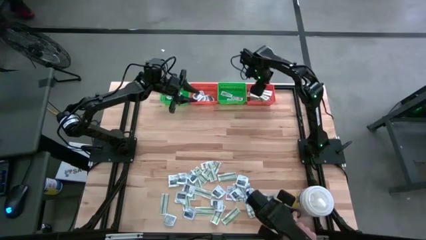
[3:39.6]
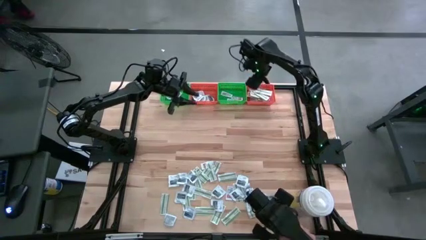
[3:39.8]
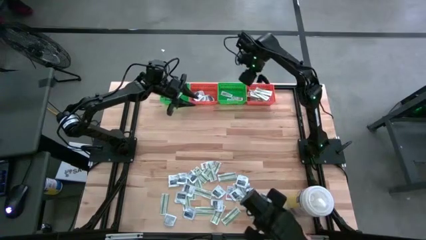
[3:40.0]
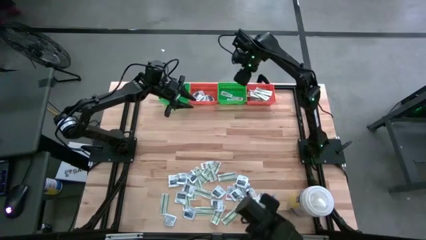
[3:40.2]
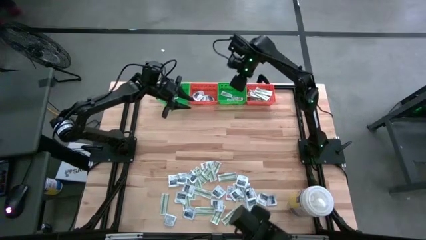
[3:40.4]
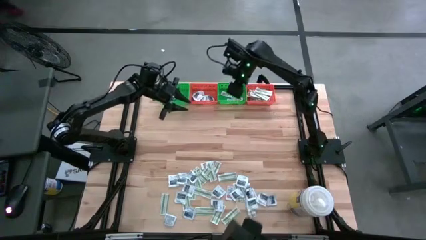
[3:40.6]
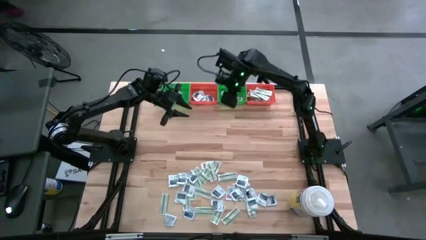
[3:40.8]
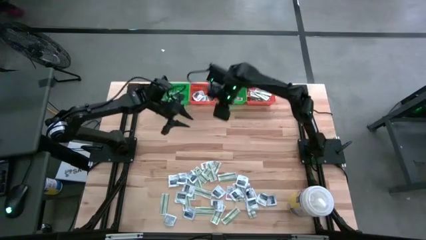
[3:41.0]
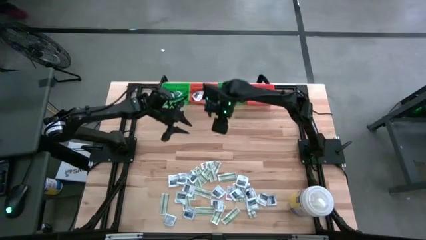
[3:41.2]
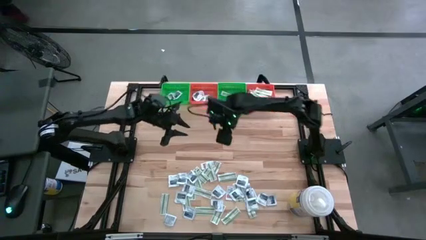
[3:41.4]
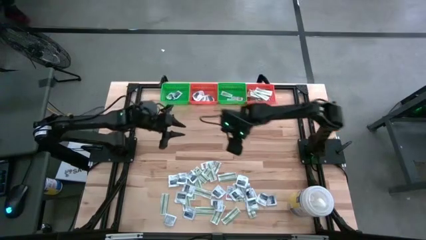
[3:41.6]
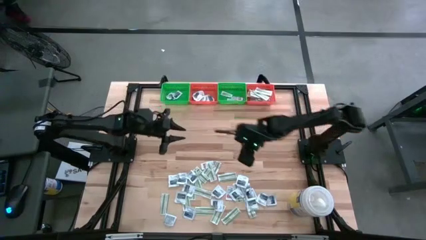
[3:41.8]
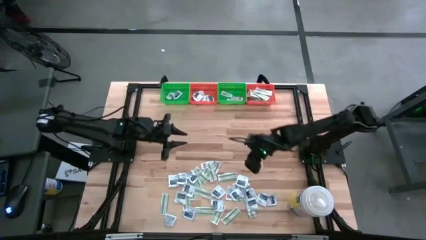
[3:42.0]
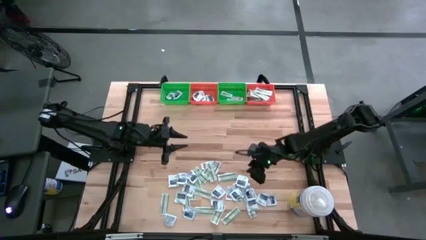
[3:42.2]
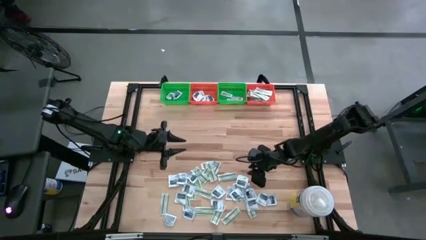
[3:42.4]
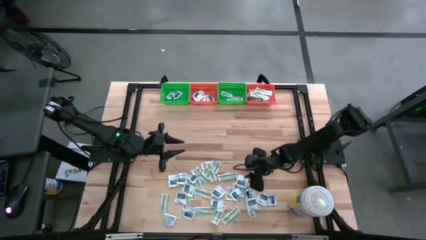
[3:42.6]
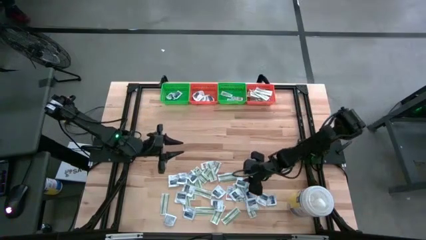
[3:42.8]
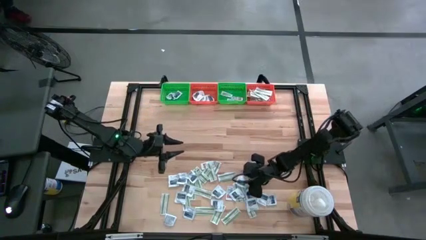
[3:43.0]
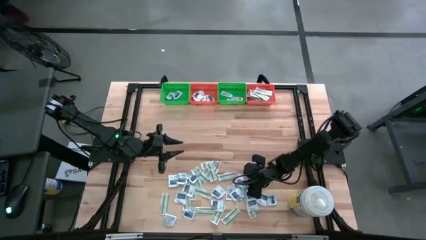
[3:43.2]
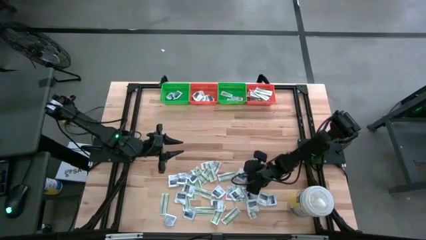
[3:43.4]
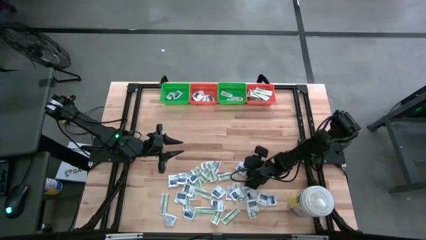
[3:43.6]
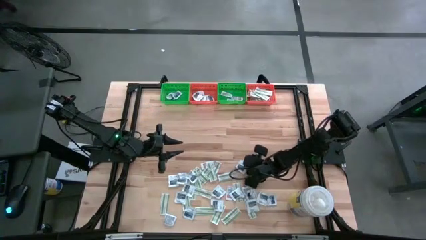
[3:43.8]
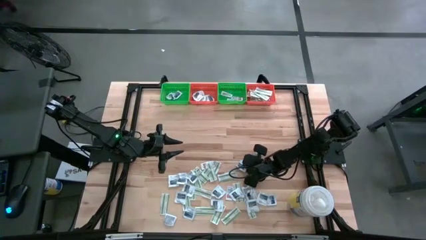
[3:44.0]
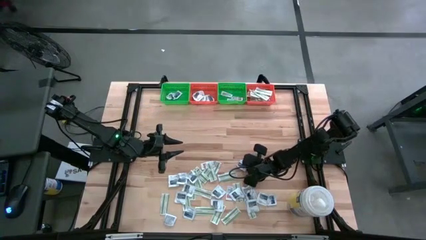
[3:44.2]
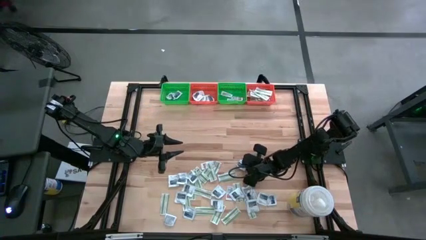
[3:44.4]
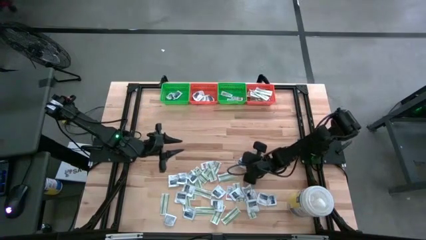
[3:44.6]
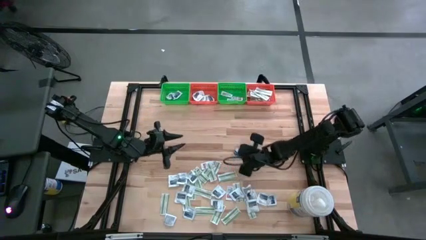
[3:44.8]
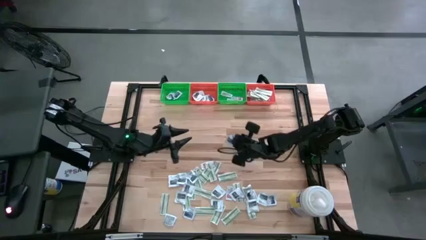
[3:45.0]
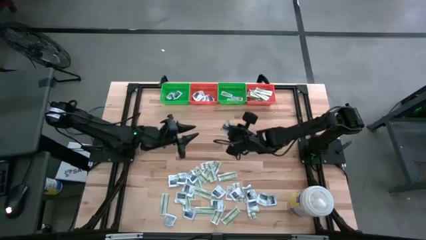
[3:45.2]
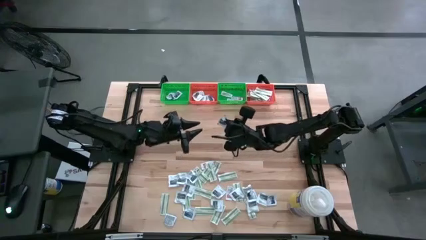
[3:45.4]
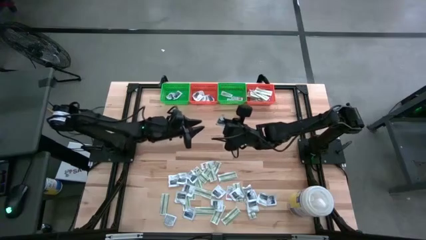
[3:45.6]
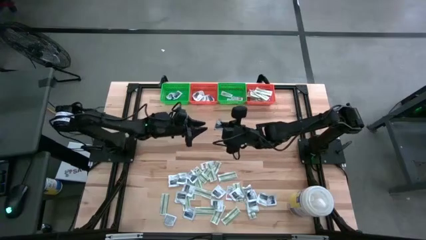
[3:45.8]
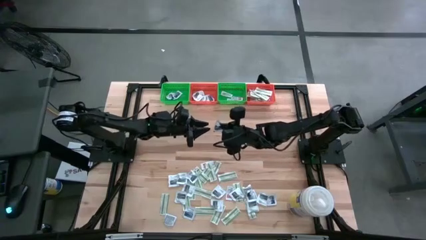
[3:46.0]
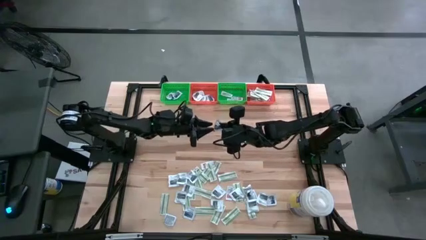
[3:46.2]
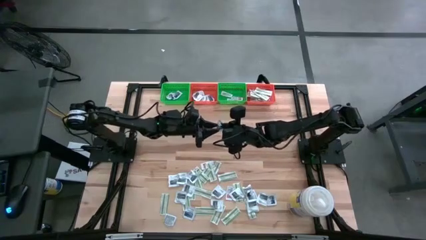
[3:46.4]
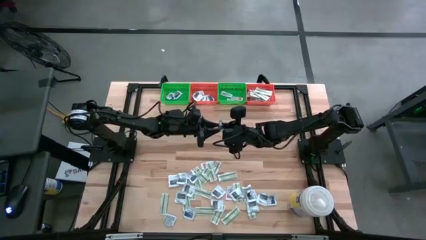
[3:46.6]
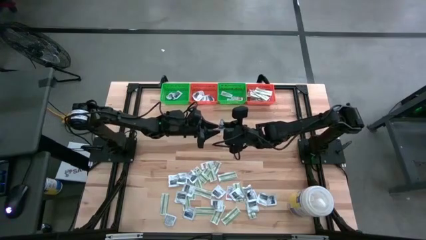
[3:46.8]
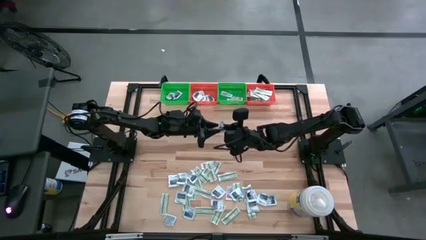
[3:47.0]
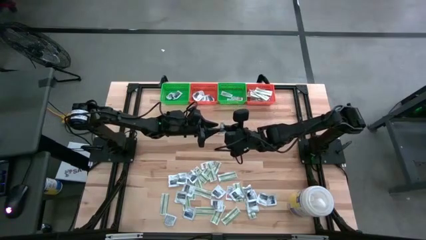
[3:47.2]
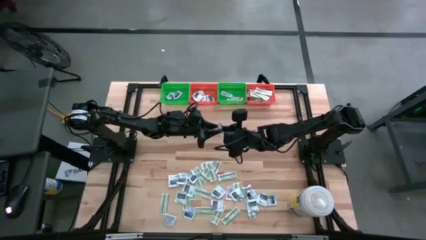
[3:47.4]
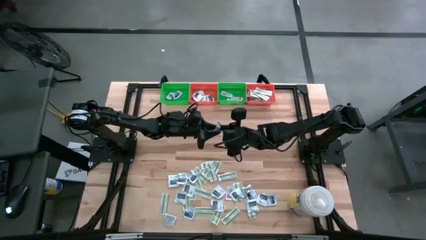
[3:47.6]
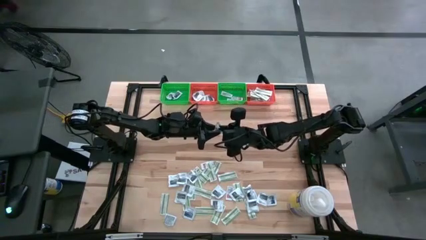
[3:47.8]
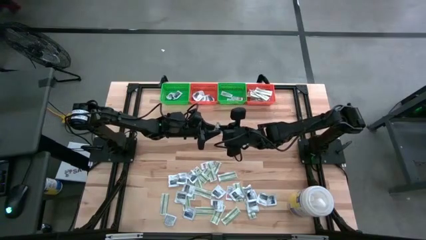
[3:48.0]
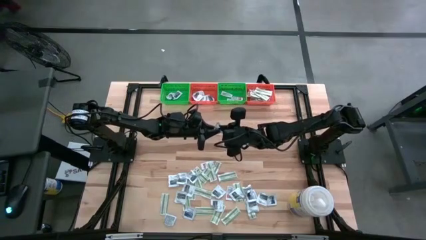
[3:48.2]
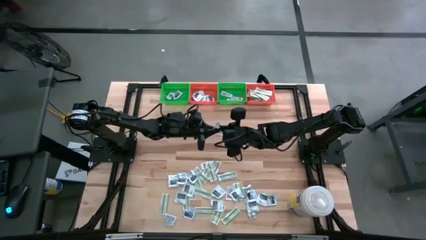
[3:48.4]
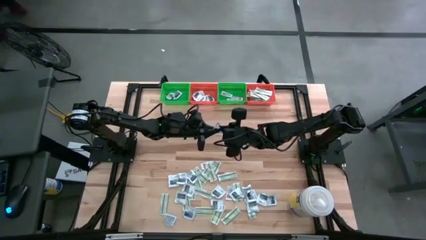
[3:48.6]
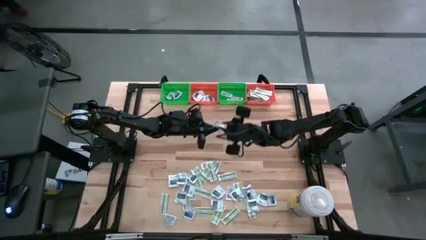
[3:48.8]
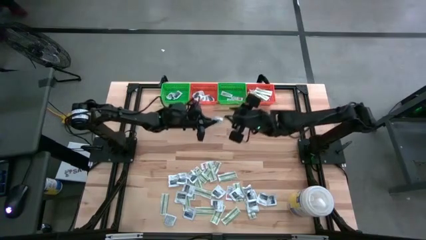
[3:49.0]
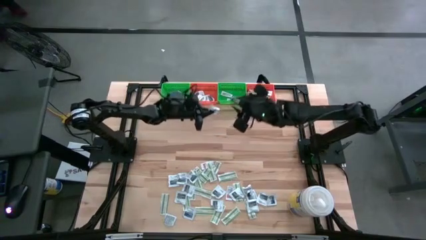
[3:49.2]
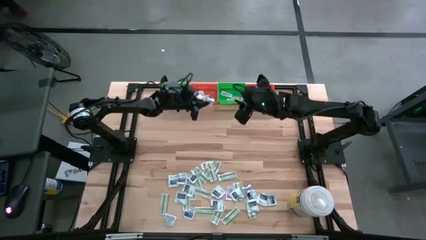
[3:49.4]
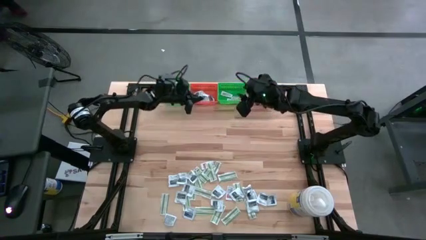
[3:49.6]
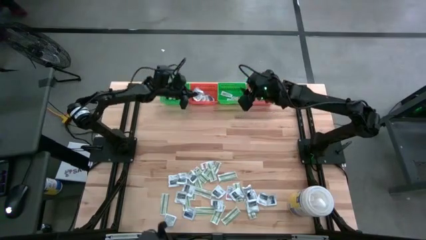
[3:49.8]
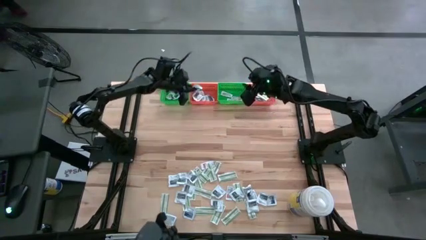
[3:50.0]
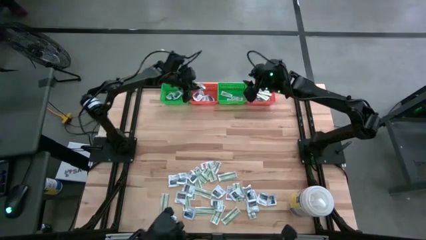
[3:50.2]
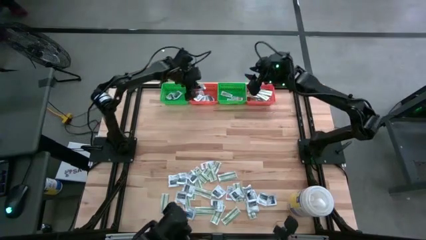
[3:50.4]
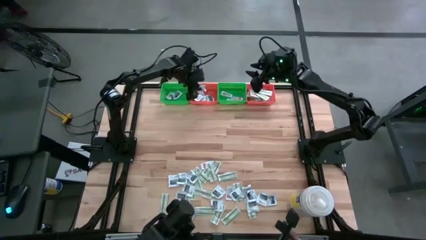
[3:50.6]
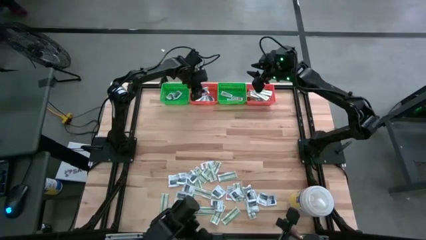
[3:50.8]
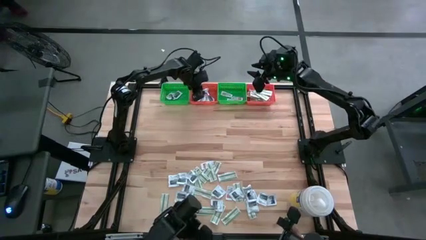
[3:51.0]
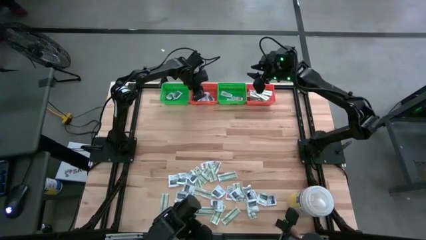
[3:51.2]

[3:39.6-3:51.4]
Task: Pick & Place First Aid Supplies
Put the gray towelette pack in the left orange bin

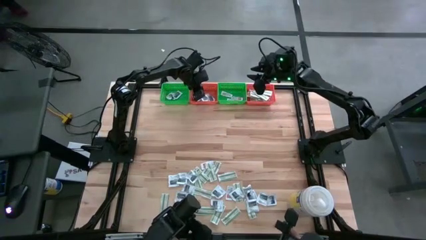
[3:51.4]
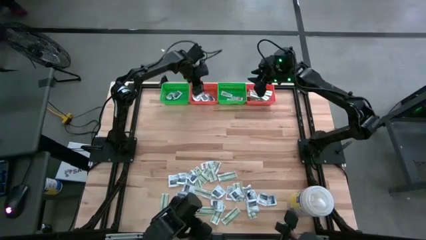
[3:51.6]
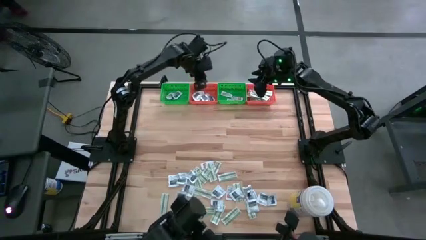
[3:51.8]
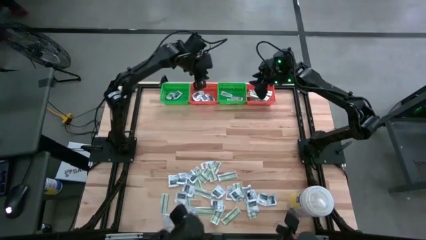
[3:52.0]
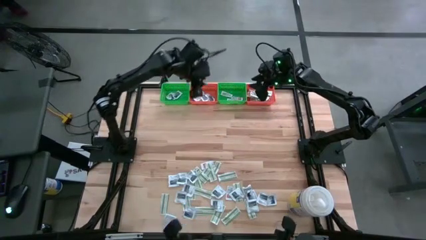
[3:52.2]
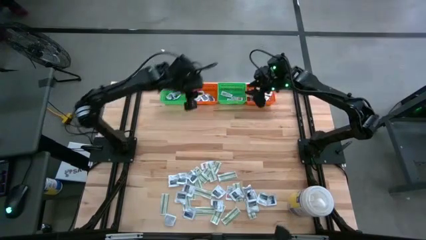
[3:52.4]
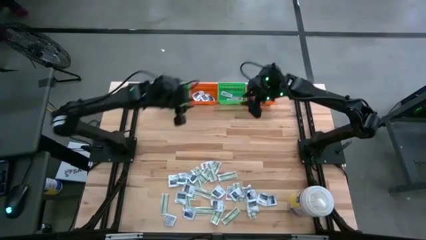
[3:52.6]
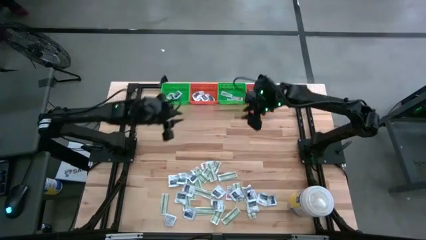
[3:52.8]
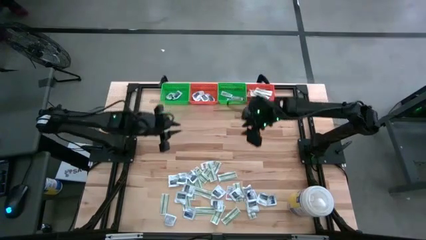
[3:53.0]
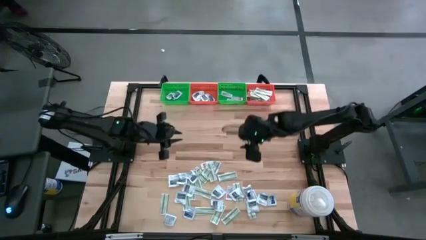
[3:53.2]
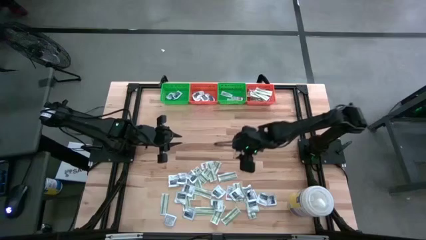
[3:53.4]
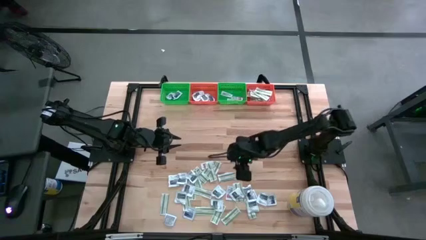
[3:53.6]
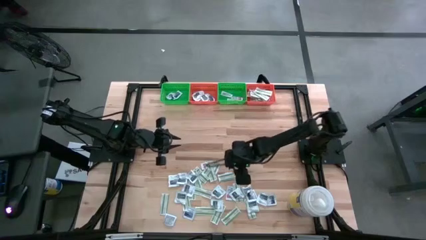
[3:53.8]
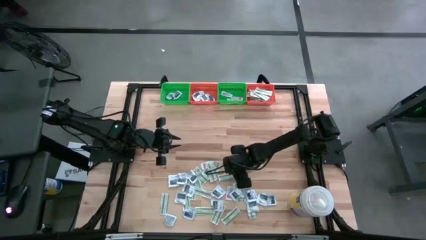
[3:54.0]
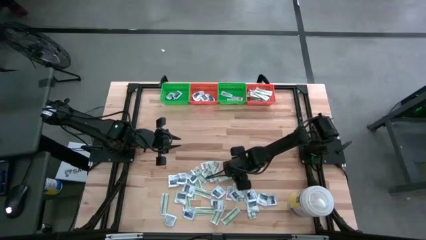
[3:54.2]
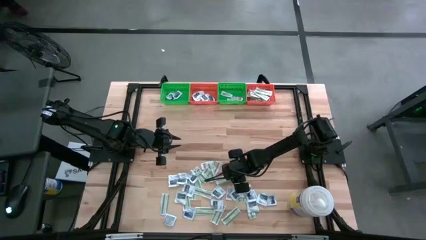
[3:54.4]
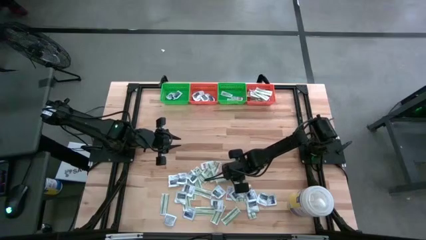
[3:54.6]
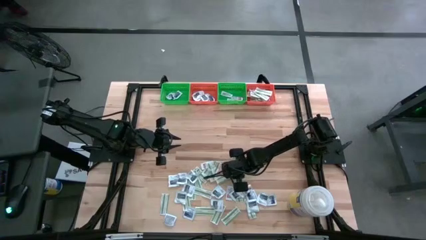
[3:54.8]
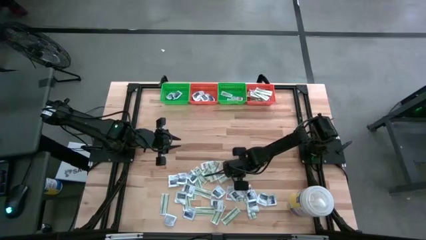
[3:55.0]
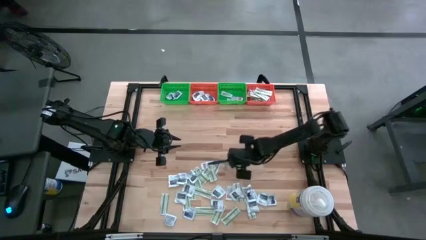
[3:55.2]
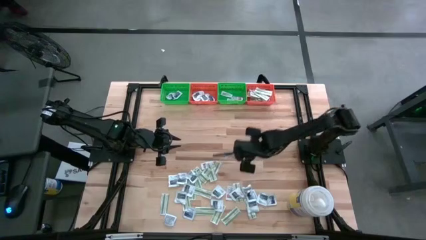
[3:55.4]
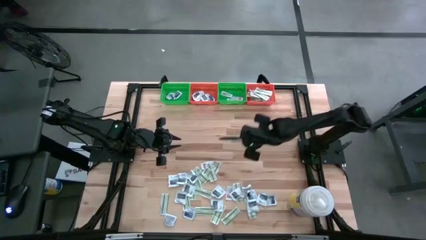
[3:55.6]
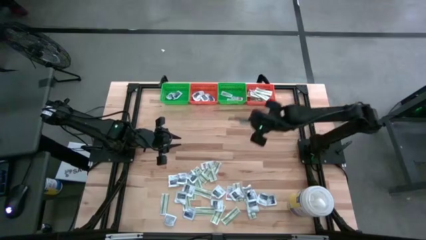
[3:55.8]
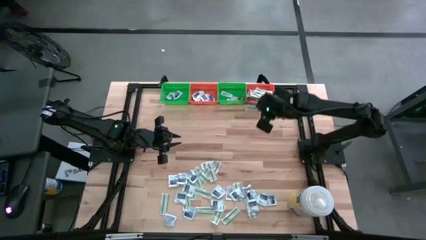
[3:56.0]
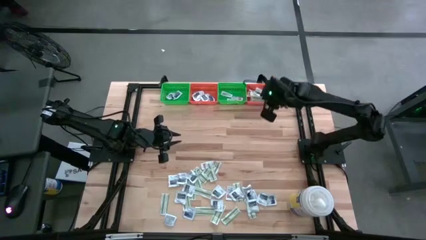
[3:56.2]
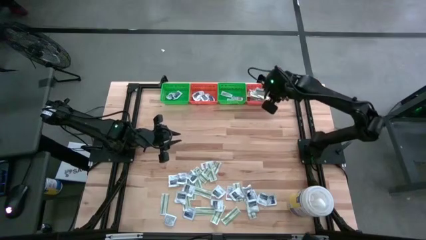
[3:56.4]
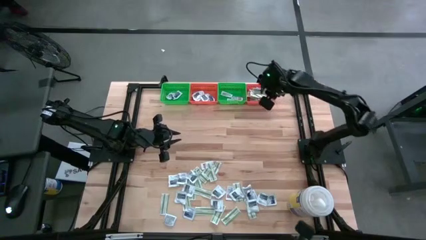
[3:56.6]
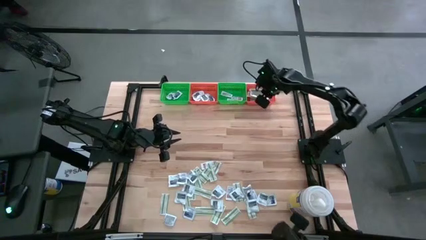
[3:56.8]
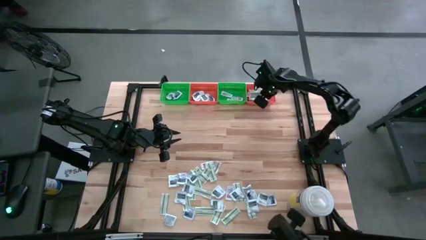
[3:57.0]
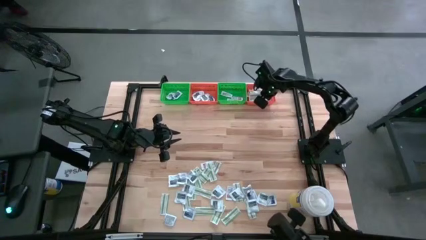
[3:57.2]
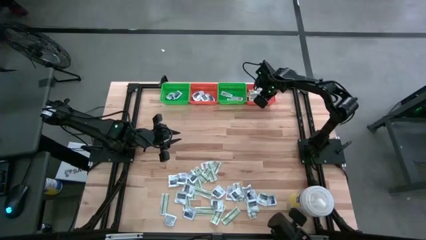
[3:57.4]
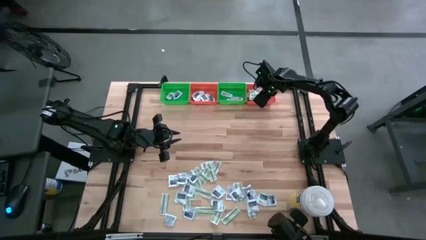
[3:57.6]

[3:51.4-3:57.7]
Put the green bandage pack in the right orange bin
